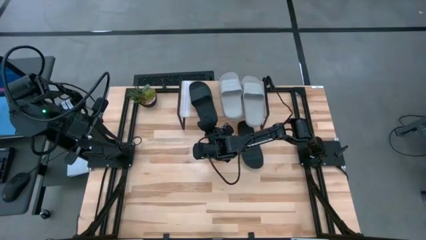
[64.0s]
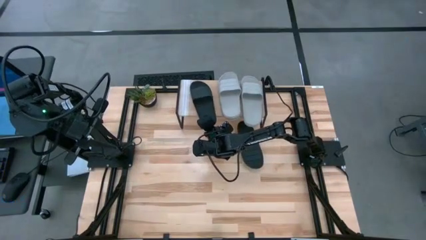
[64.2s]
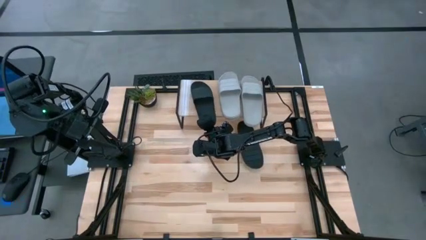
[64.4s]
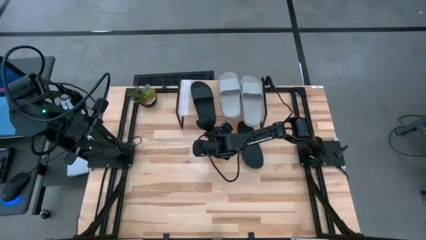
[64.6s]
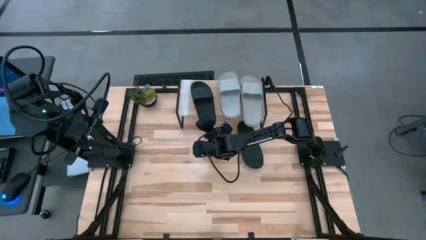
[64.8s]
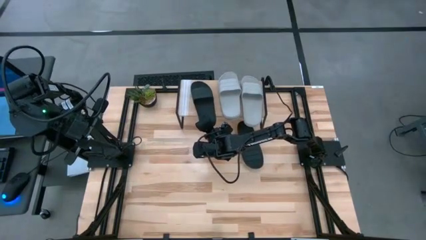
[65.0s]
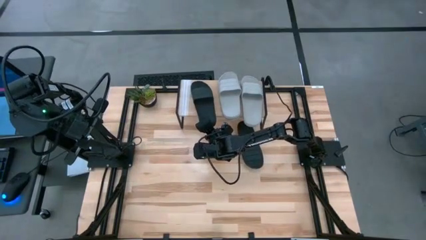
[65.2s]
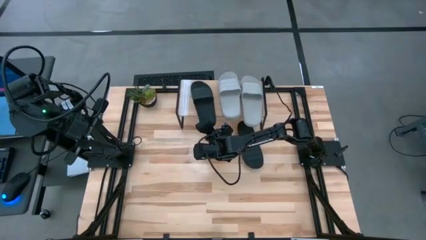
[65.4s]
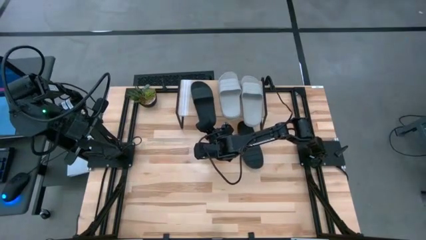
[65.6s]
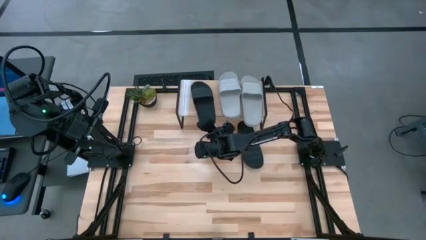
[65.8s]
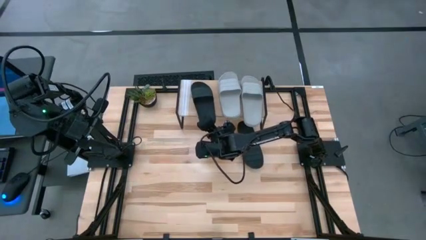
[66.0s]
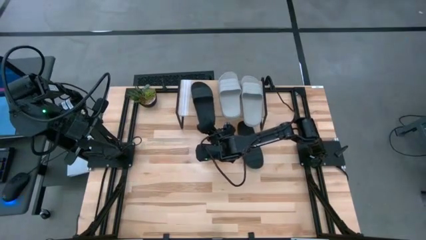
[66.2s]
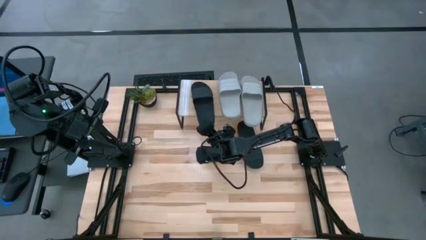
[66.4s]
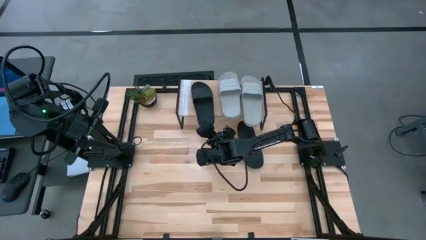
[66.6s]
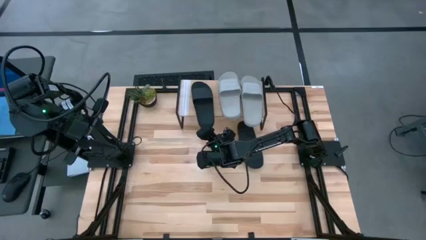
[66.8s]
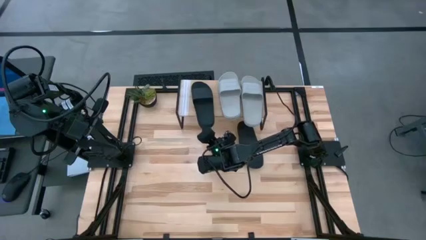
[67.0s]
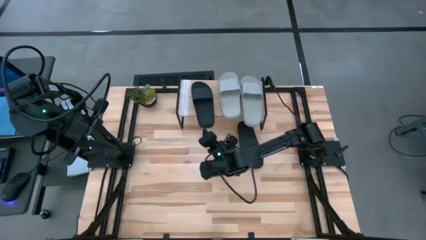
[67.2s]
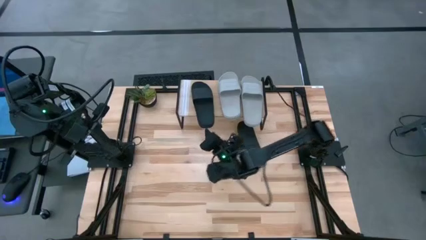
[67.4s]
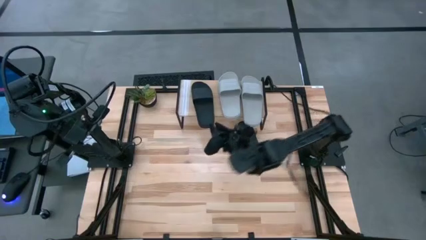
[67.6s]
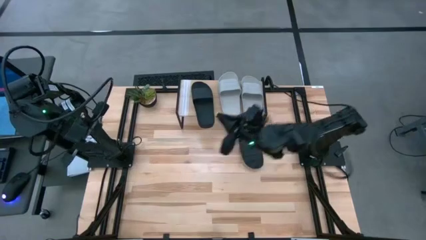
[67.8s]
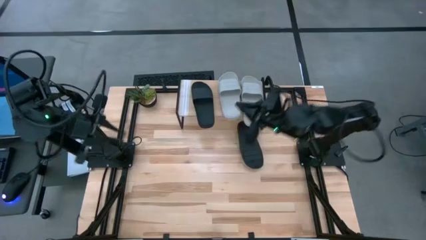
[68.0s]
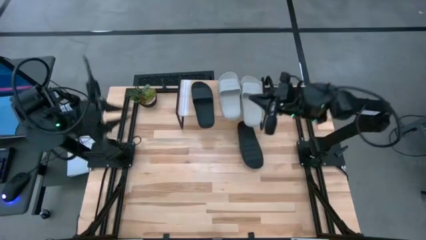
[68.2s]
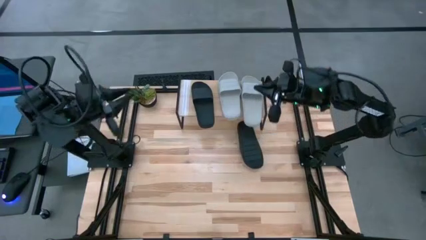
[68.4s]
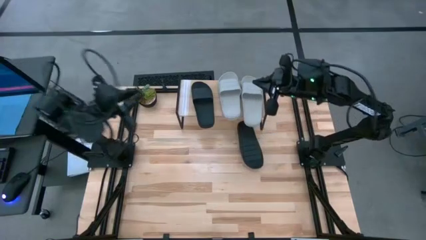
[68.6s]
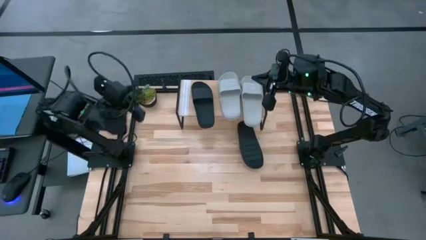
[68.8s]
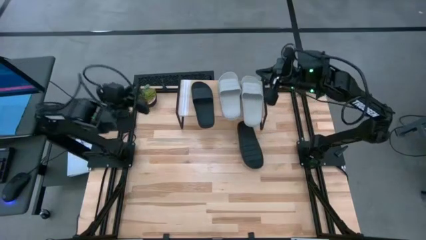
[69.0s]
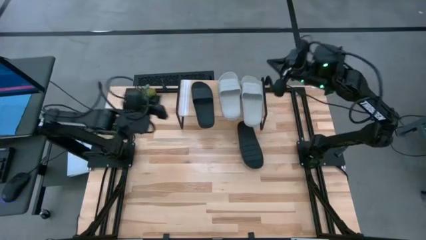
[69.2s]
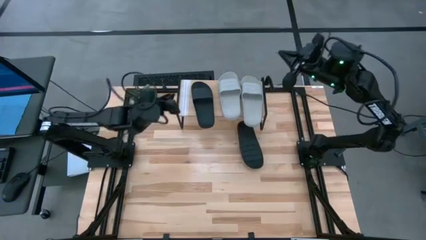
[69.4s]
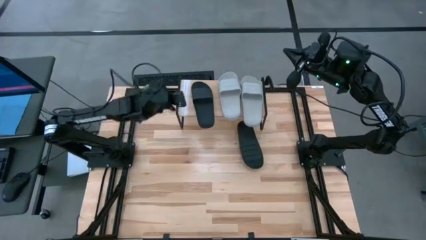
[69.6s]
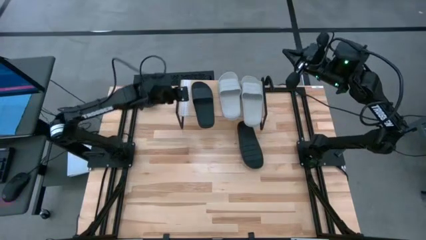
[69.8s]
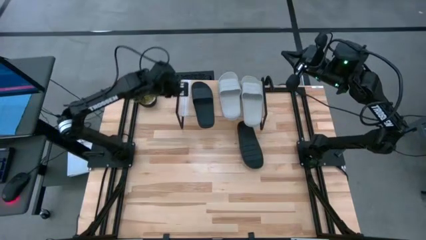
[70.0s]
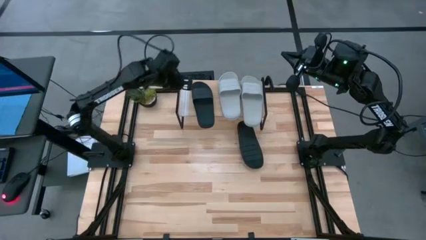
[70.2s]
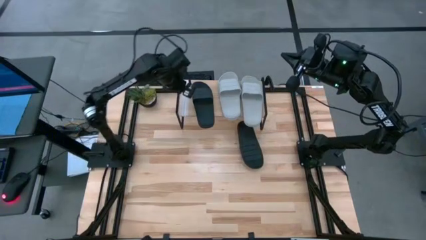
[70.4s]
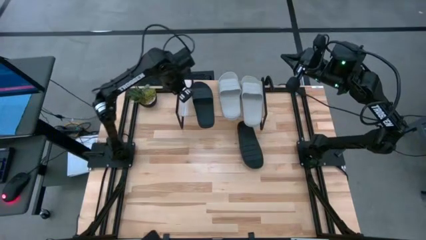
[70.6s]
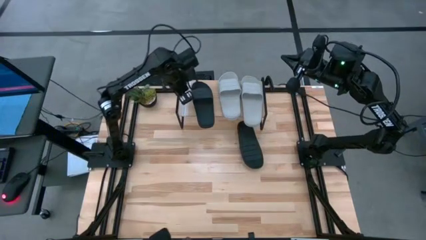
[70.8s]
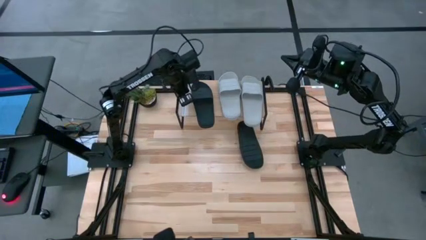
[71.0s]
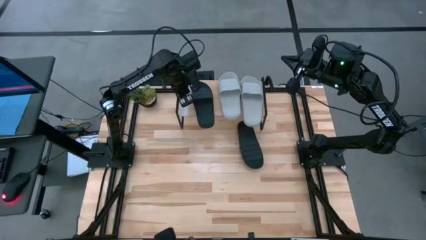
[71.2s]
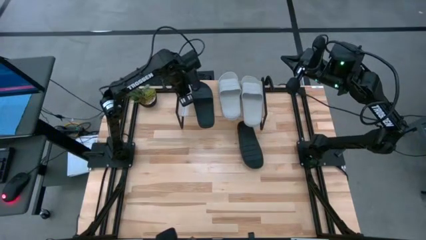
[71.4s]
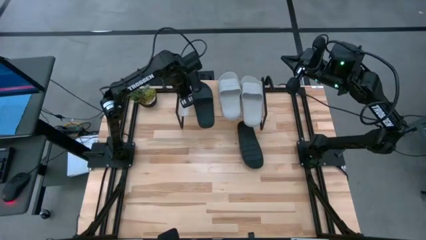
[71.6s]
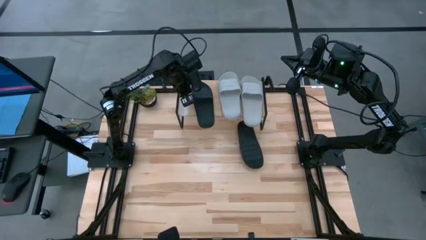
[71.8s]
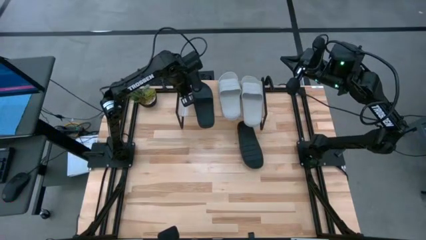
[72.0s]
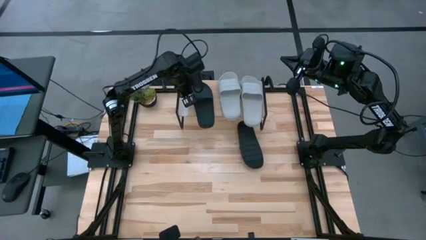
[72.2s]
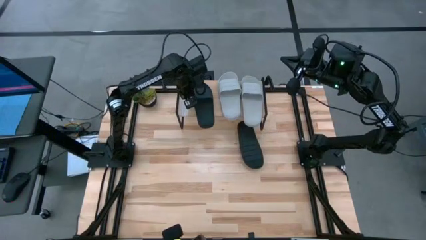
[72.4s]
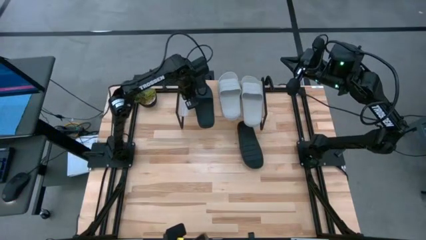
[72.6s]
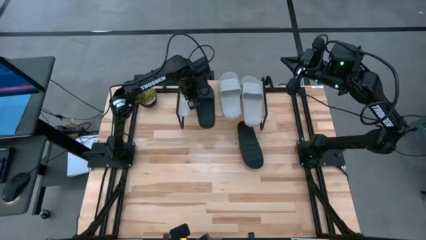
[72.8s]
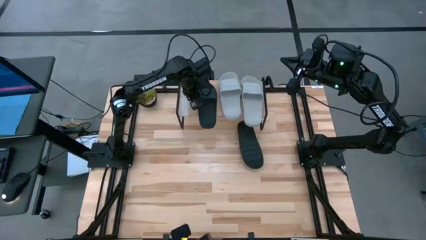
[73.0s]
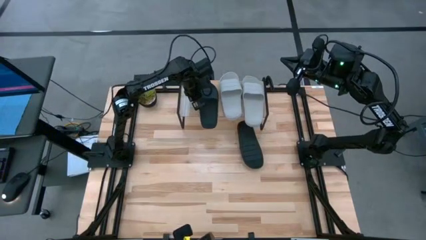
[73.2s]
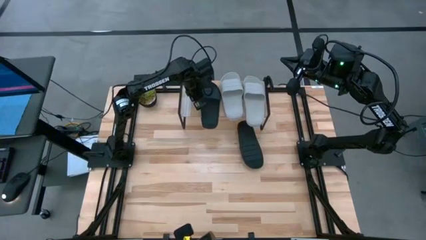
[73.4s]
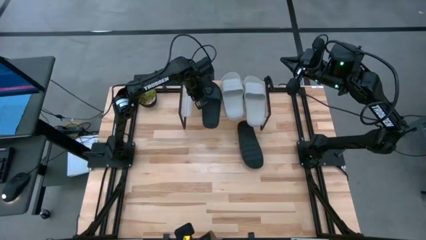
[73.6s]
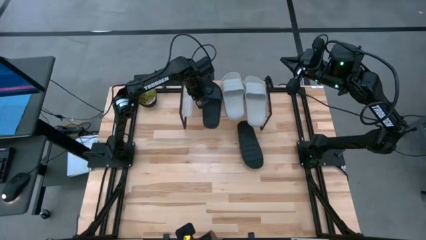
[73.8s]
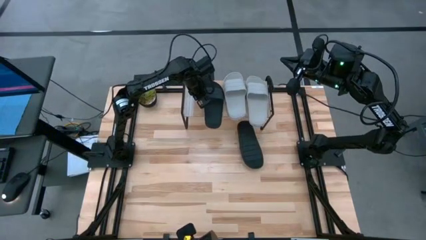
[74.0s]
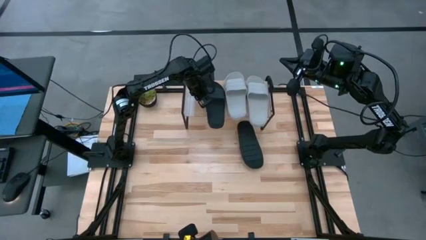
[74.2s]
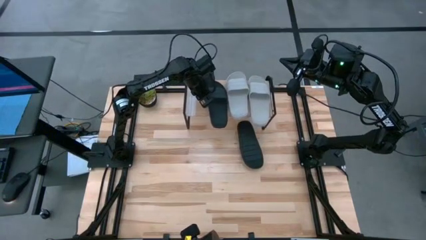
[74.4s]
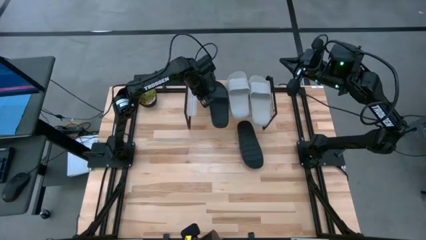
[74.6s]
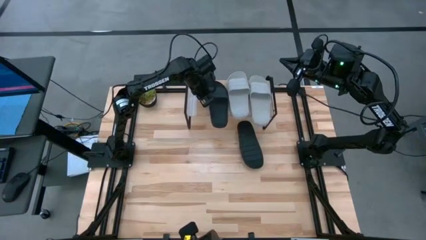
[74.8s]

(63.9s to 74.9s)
Task: Pick and place slides into the shelf
Put the left black slide on the shelf

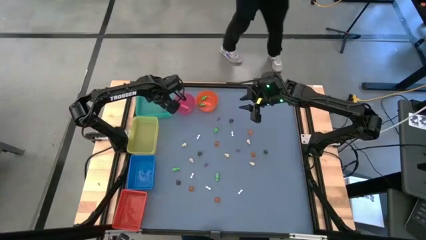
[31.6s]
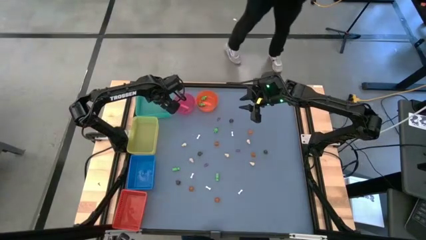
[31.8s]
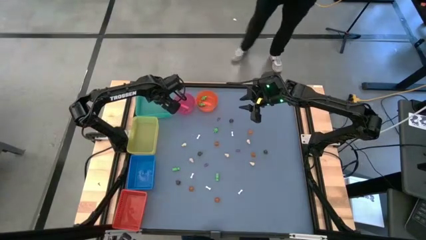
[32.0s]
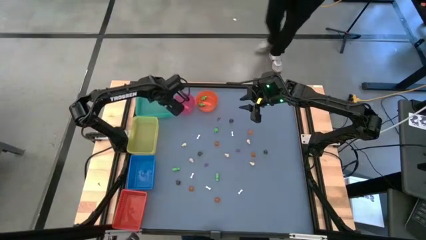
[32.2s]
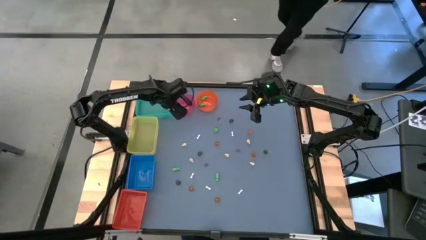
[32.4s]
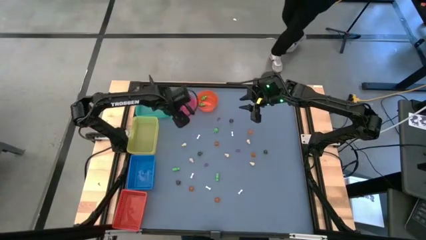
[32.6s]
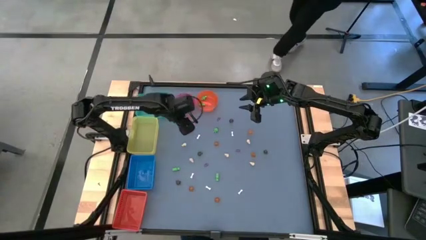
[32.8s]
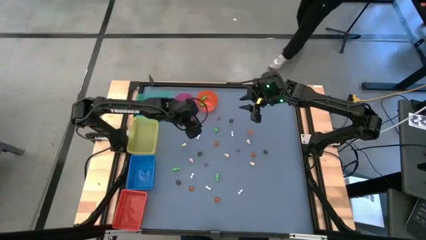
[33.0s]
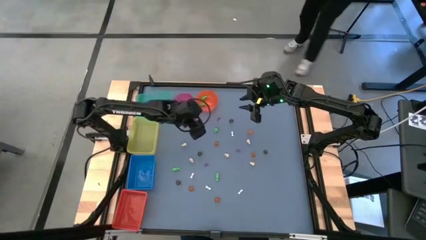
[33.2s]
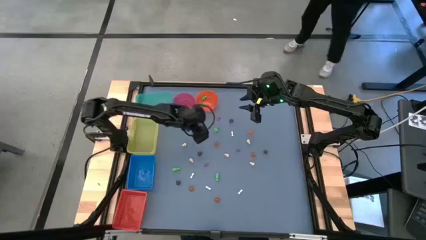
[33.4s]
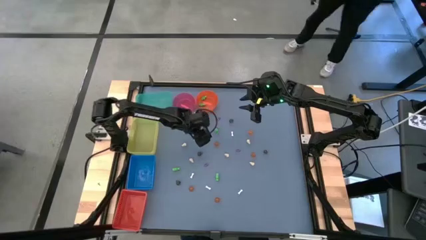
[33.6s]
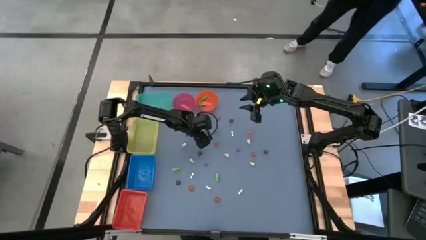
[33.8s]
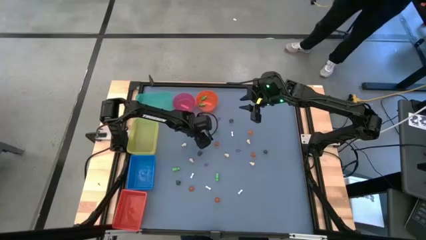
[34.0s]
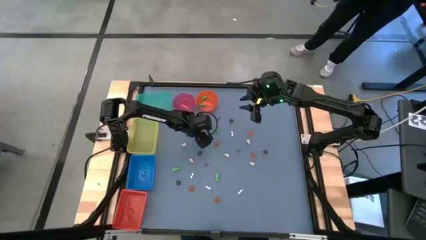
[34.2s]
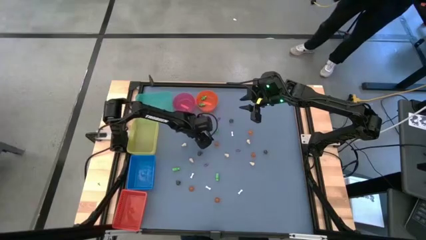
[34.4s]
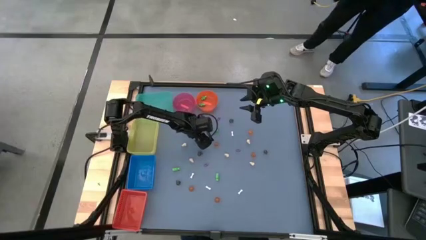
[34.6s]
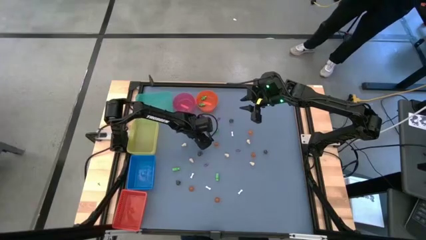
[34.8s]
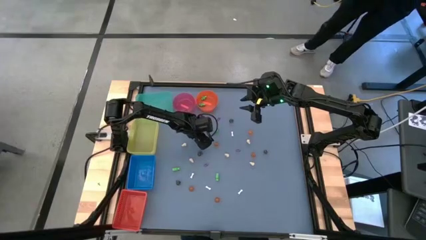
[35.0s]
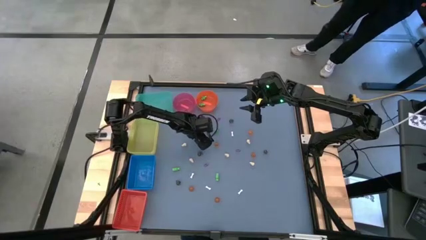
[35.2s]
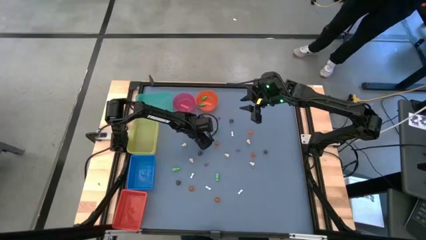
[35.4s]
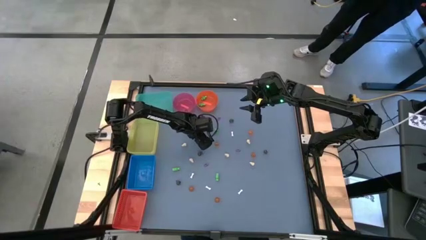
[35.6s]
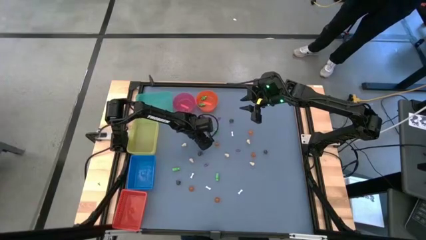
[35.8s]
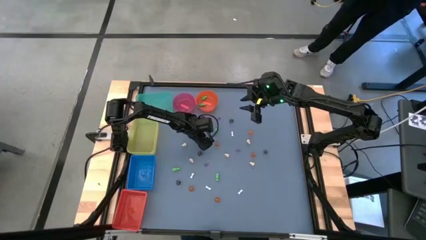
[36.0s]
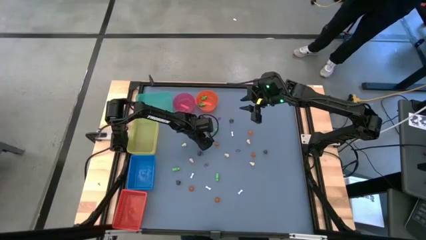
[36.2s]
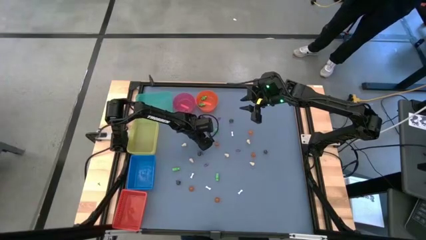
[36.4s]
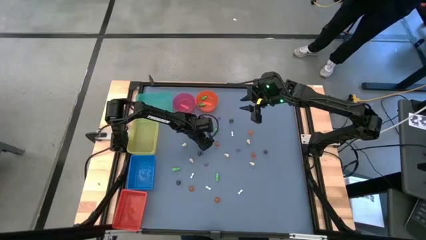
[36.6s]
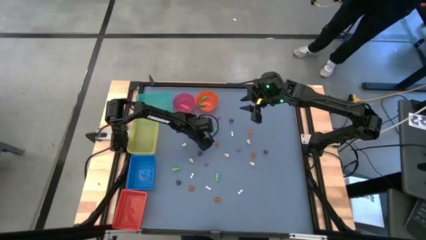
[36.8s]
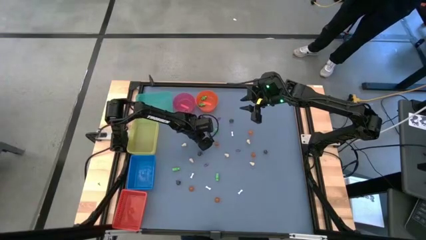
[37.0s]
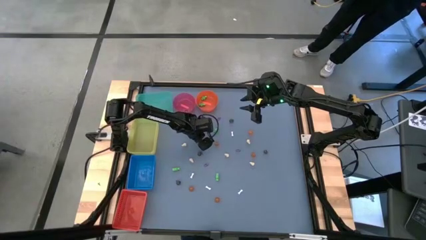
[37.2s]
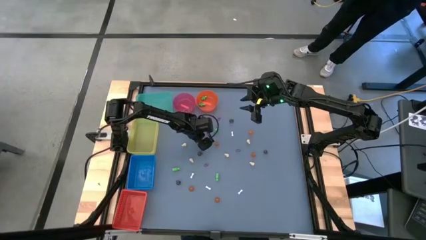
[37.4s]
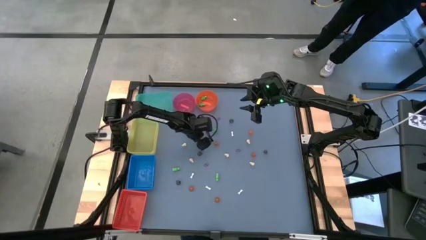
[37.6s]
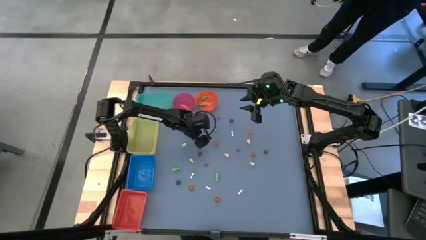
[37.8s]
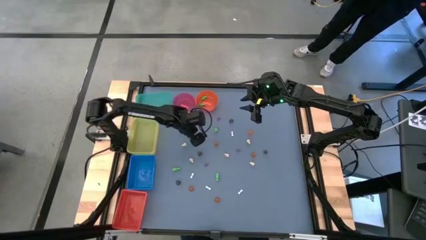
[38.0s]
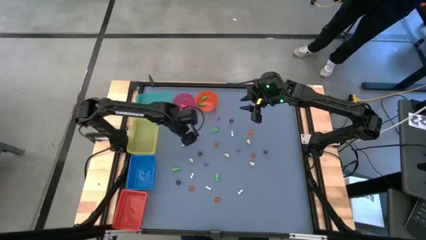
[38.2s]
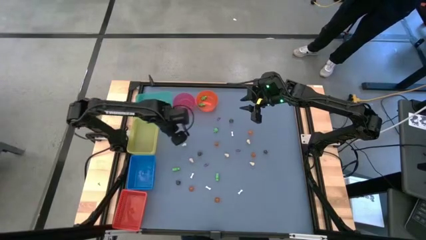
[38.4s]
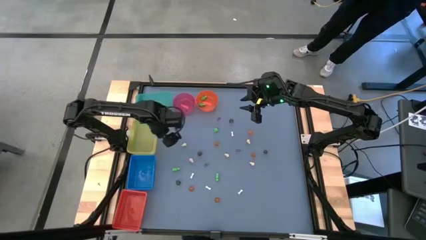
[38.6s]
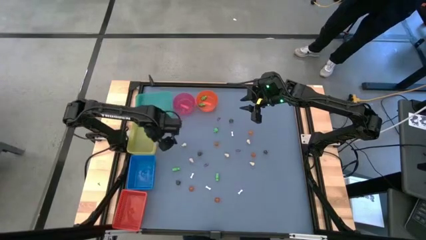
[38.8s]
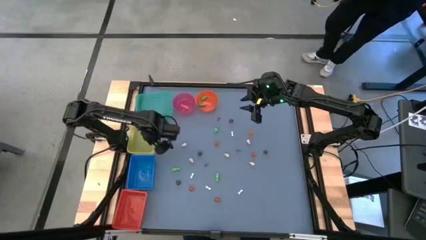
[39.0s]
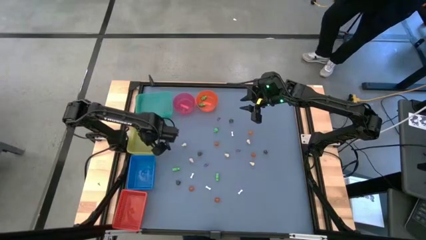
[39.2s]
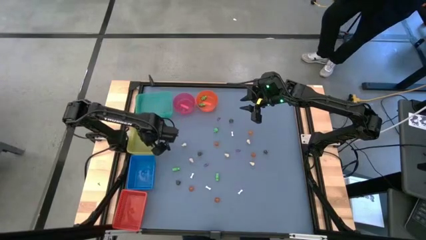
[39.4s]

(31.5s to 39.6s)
Task: Sort Halloween decoration
Put the white bone toy into the yellow bin
